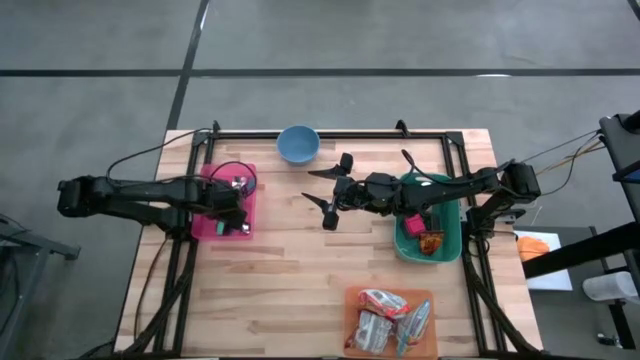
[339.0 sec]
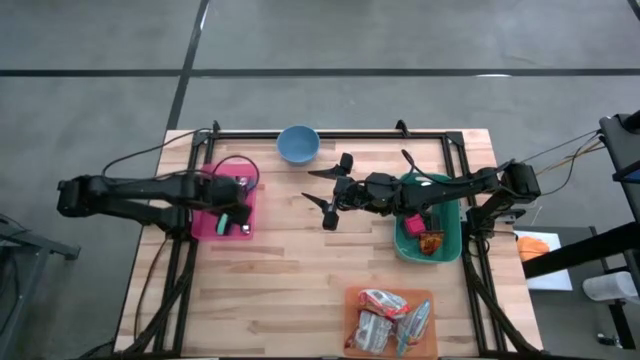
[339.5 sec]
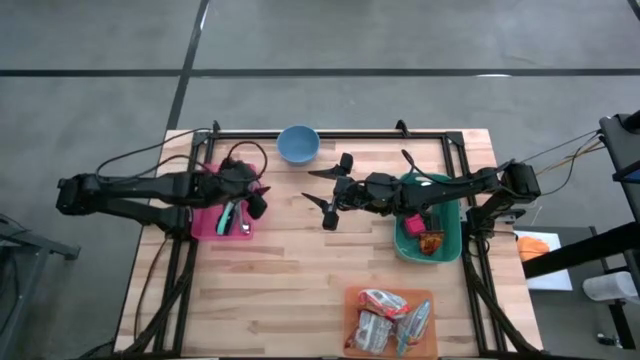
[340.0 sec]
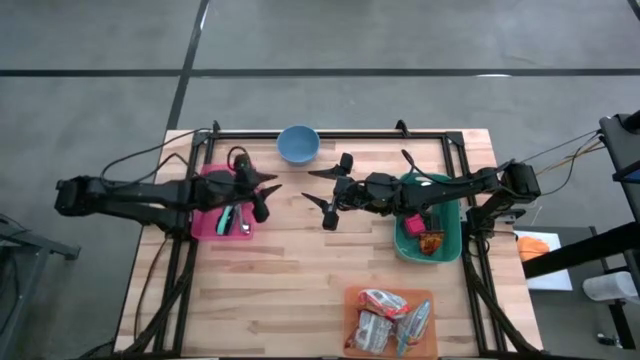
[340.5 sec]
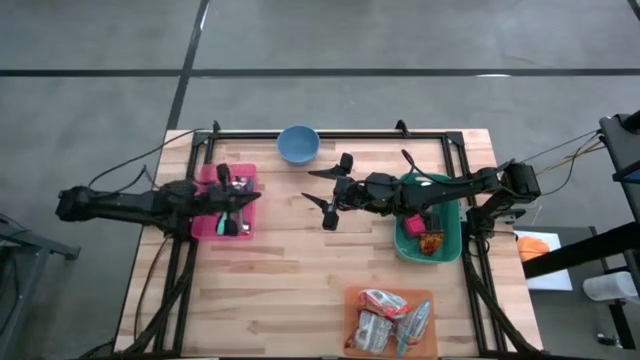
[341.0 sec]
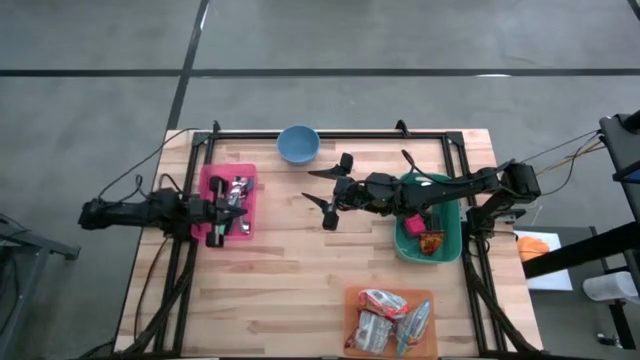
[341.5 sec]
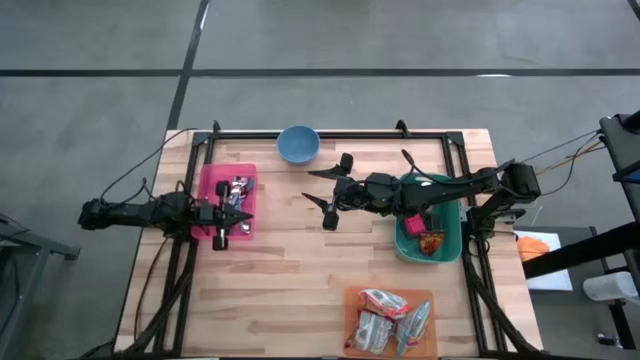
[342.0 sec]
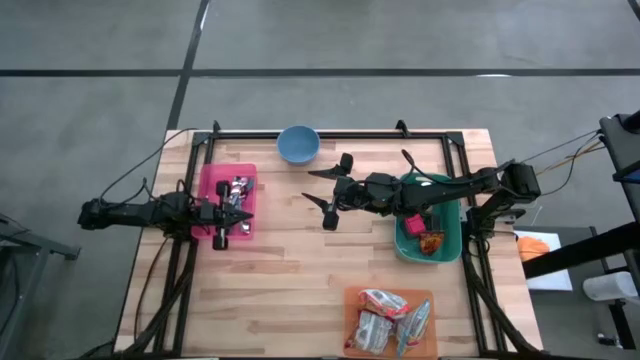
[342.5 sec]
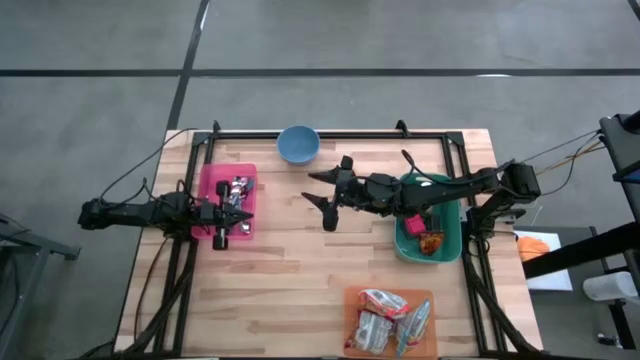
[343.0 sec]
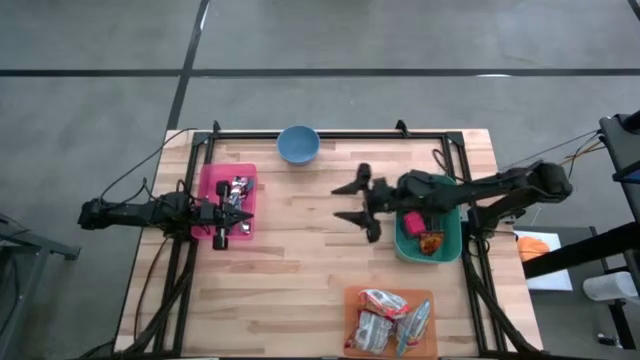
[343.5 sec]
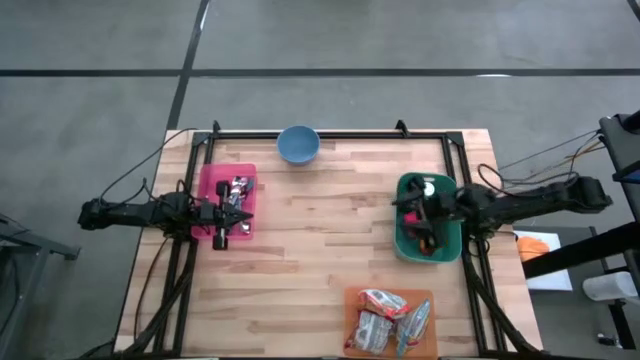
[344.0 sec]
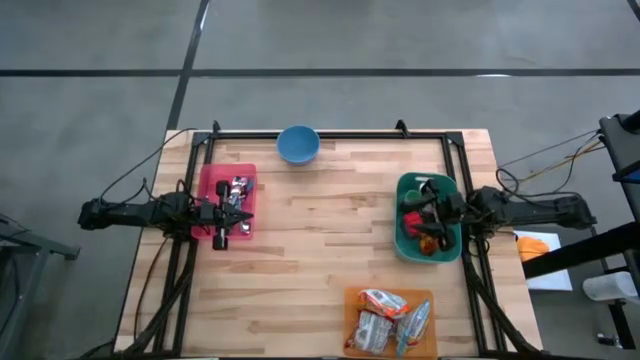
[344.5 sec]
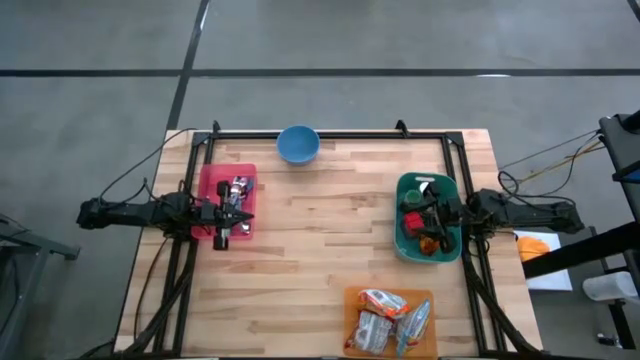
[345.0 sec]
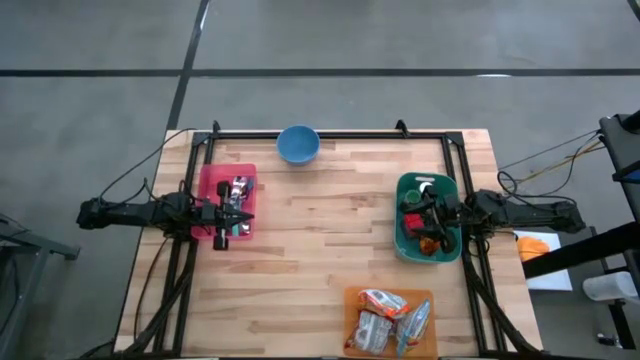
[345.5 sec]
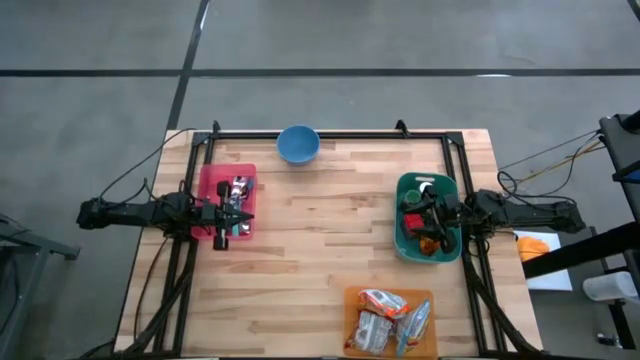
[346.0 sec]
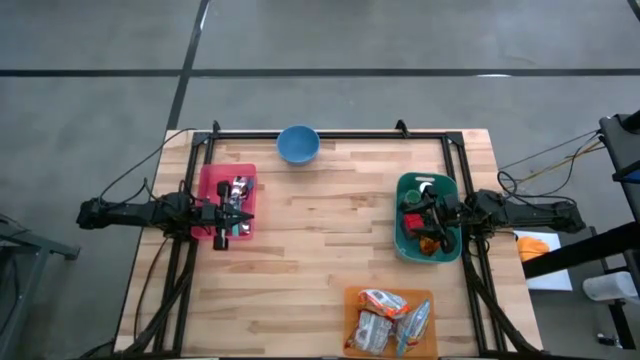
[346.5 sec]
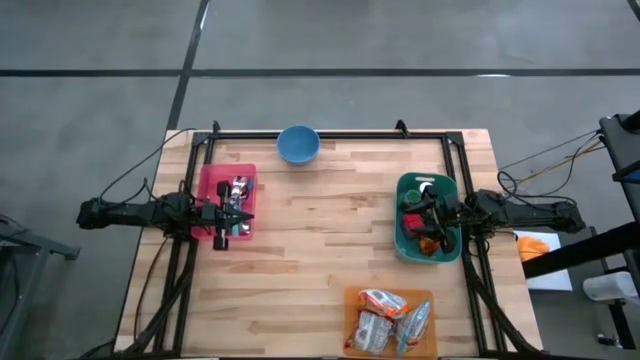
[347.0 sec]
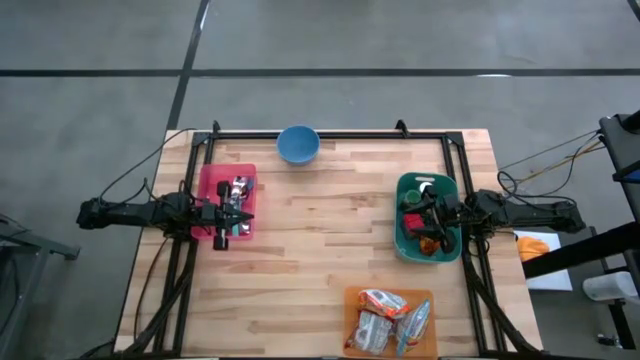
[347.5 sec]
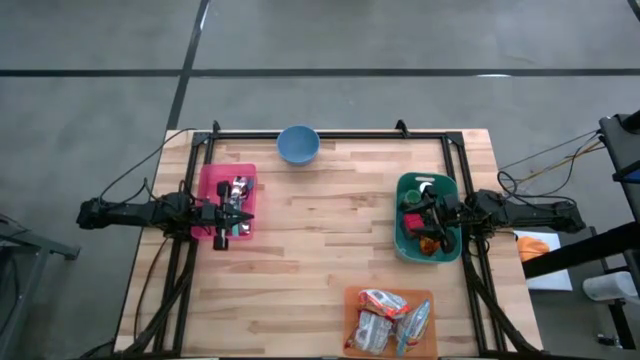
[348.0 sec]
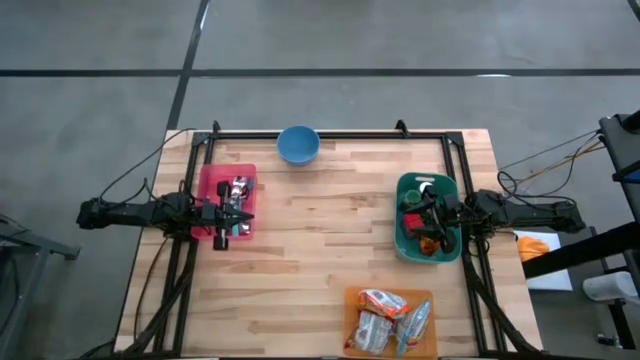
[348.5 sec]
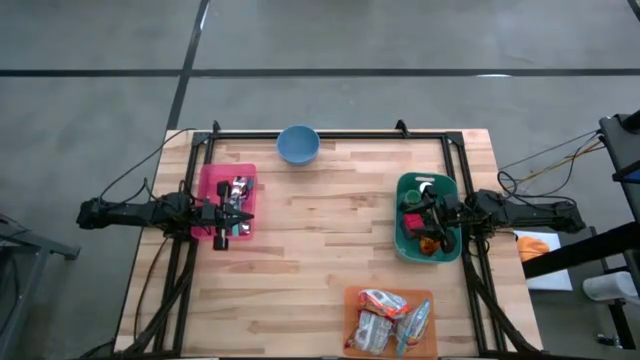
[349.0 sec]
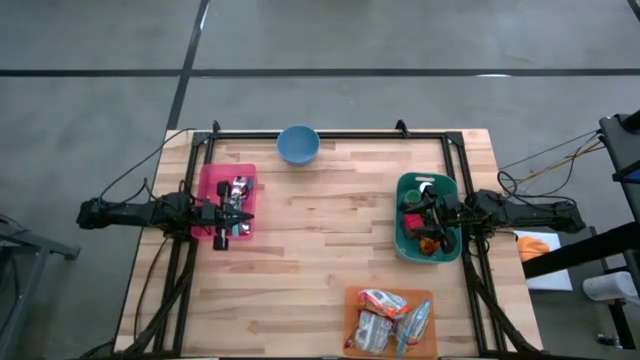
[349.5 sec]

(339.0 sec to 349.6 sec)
Return to Home Position
